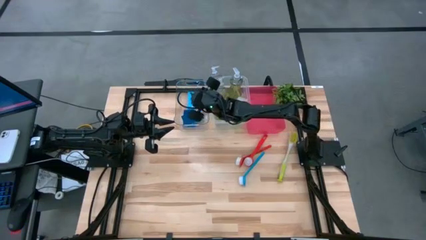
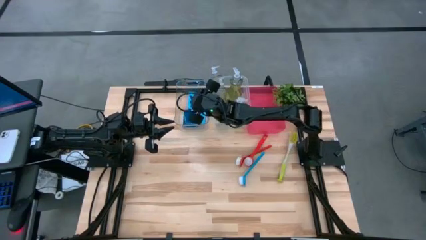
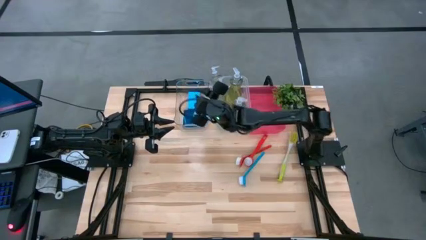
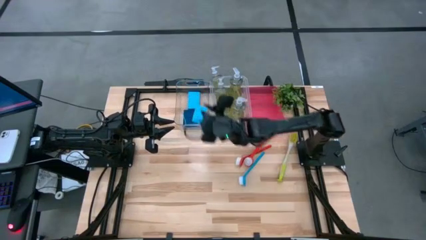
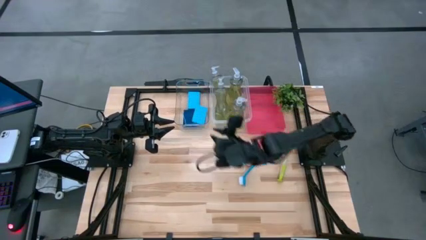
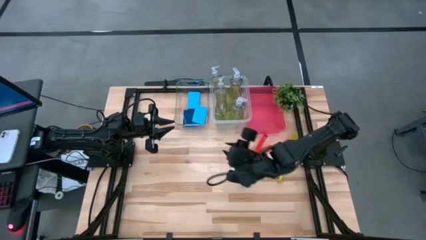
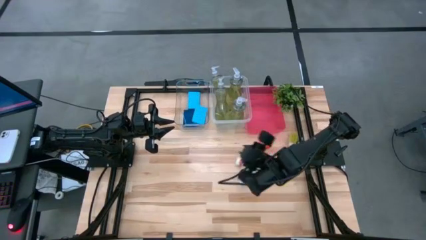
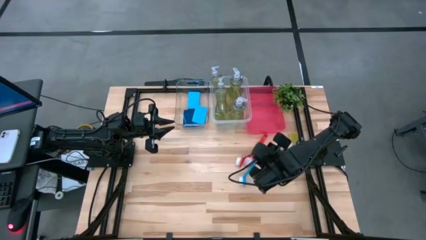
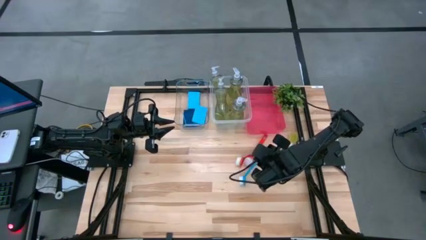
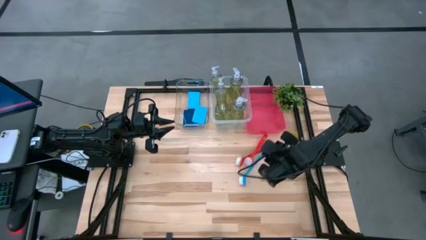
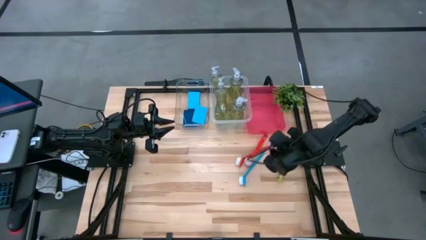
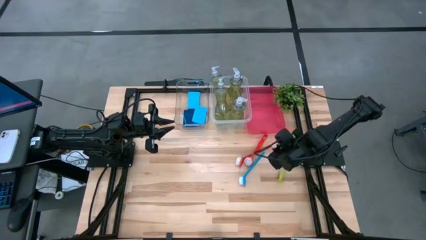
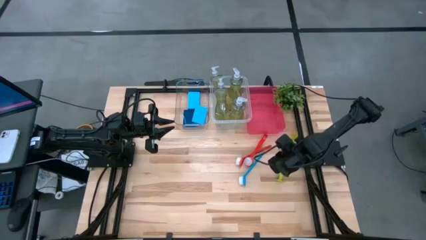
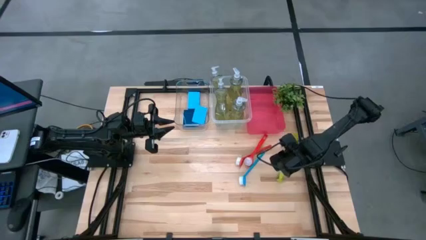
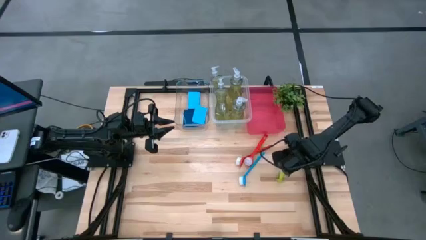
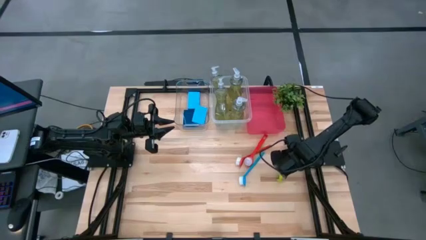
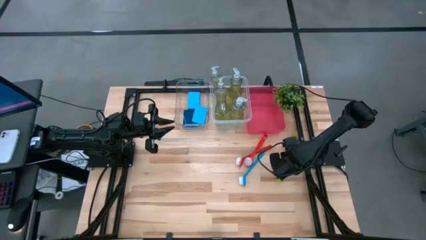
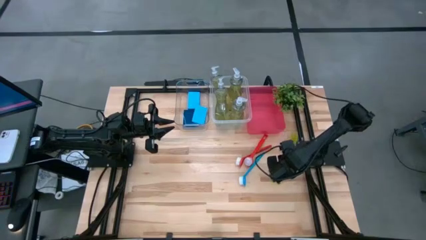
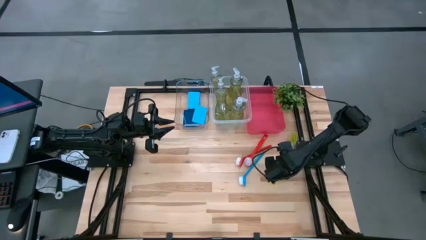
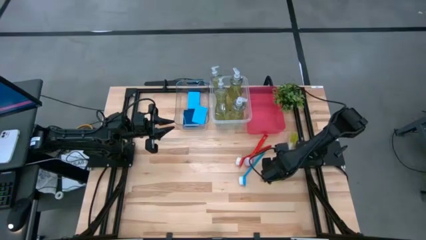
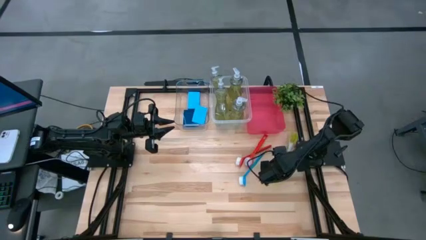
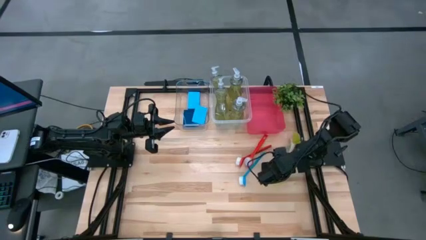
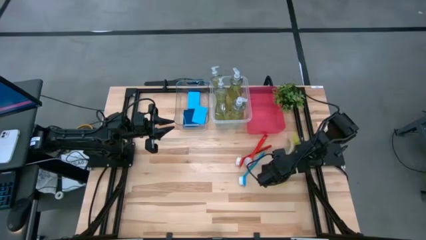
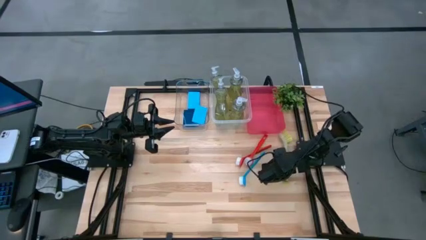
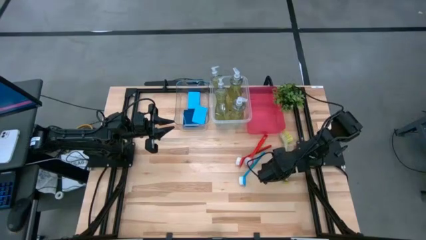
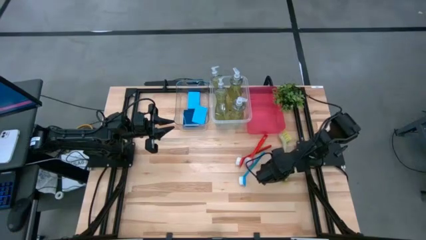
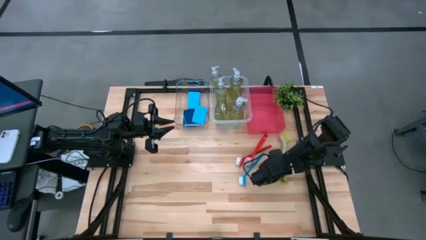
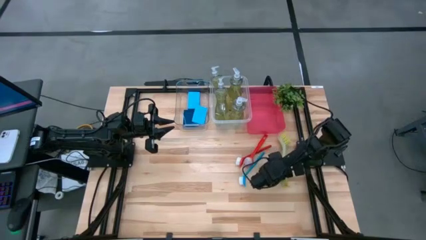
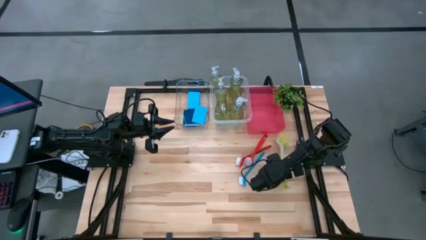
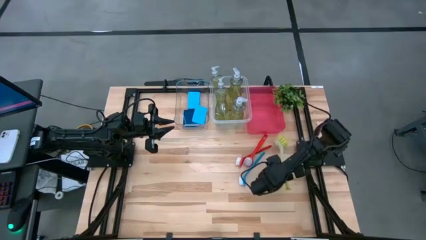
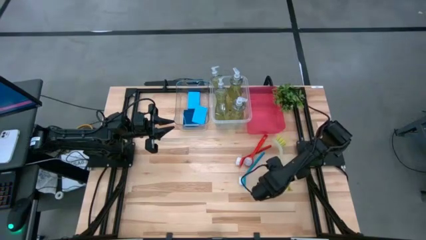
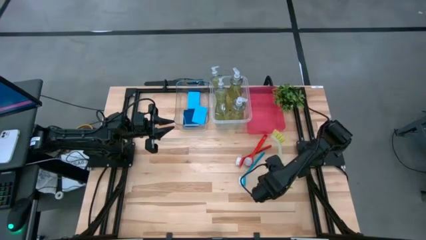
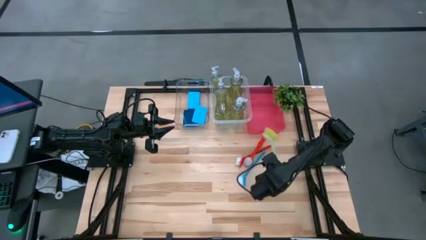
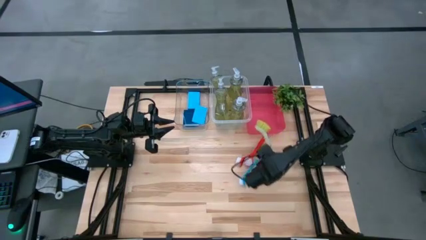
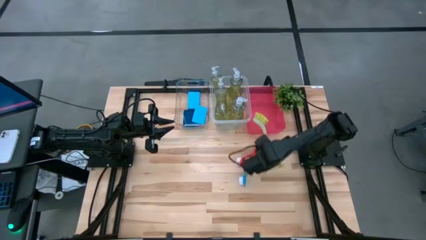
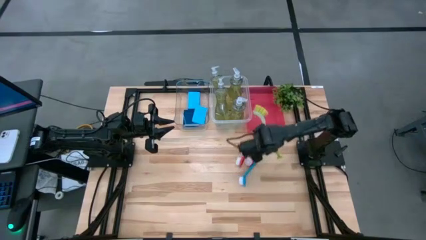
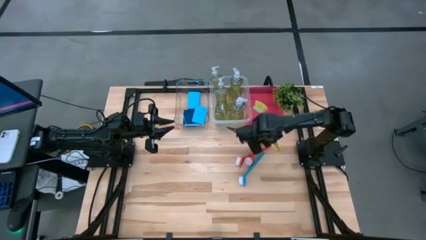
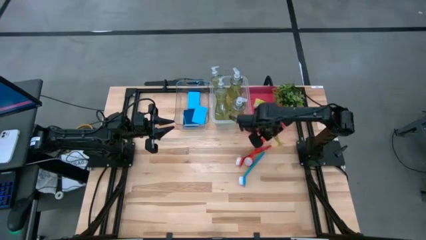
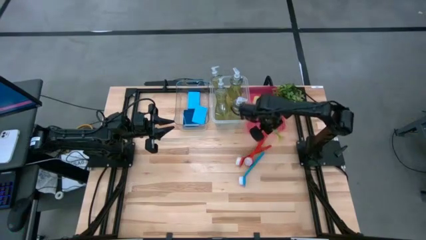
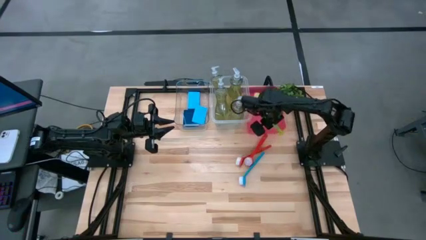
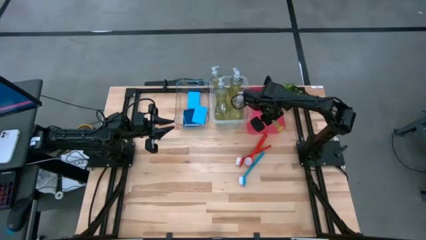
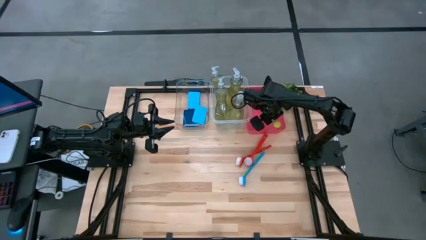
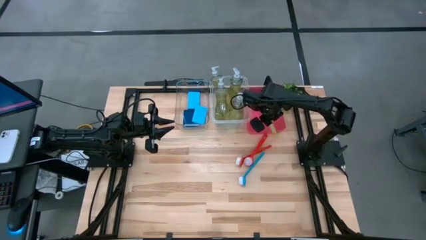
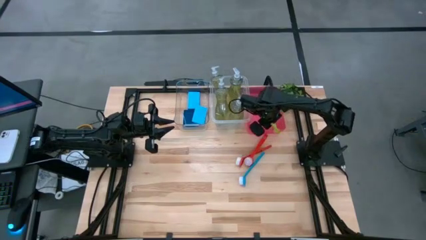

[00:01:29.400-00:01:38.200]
Task: Pick & Place Kitchen Sink Supplies
Put the yellow dish brush into the red bin

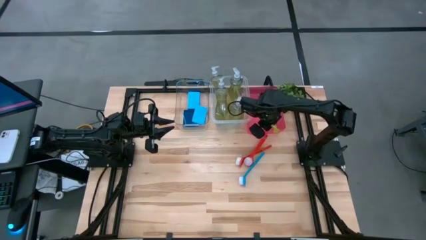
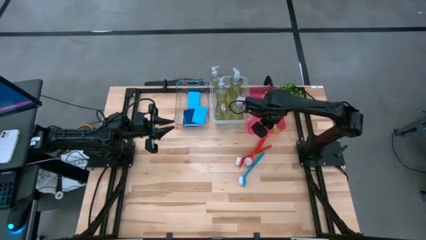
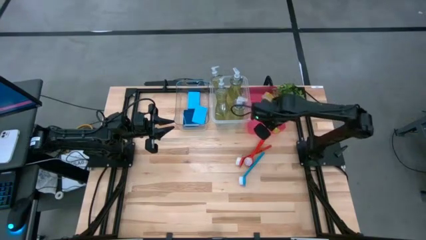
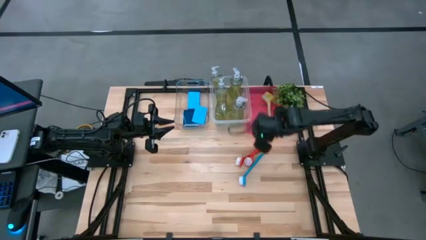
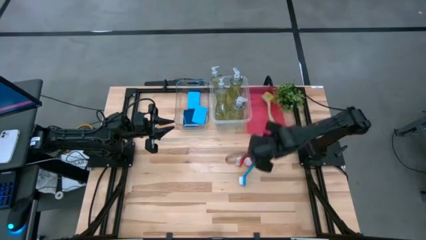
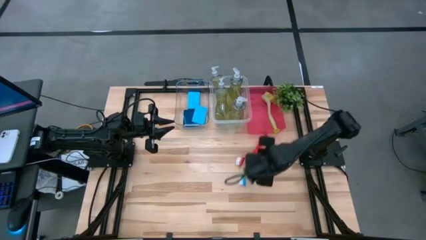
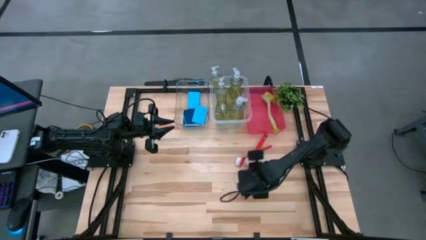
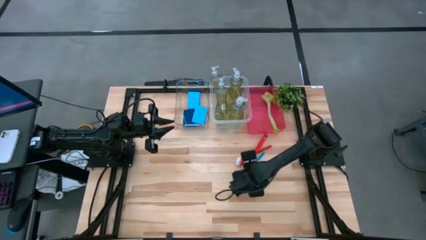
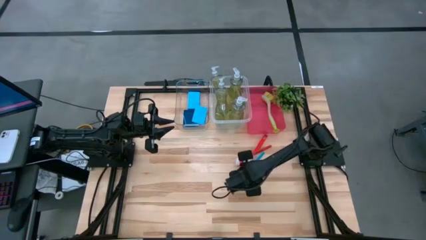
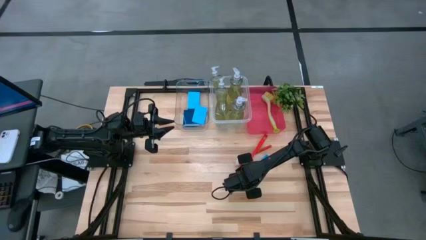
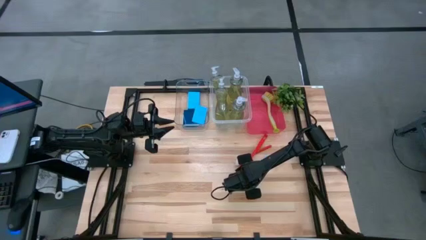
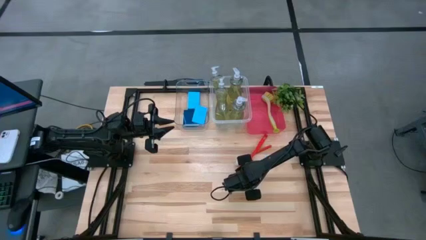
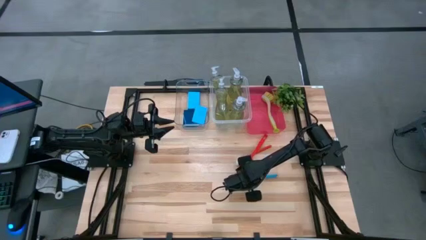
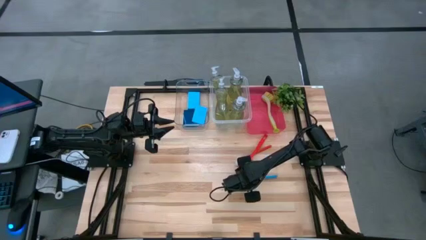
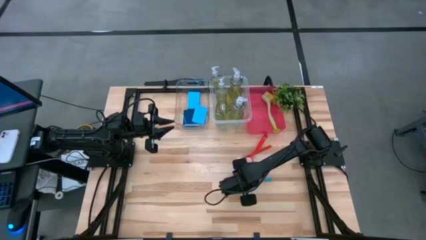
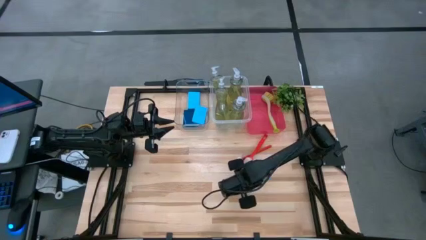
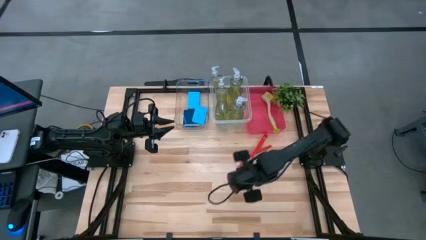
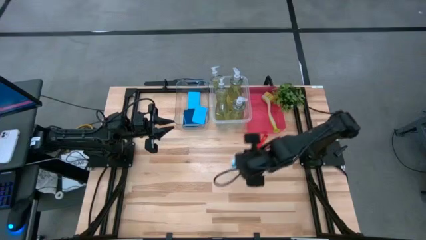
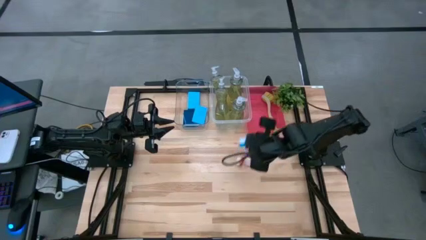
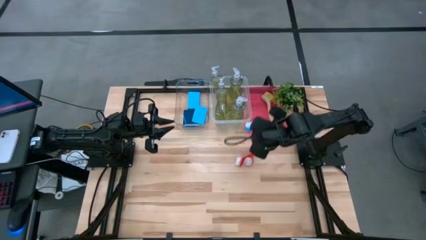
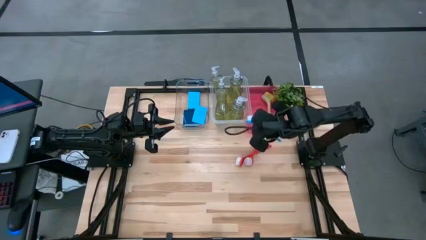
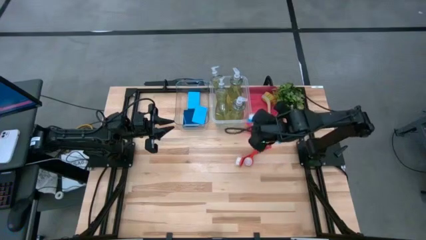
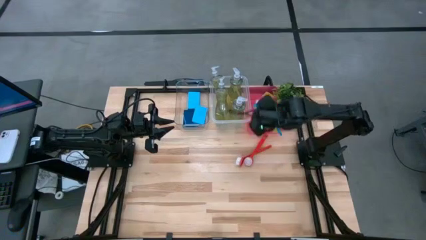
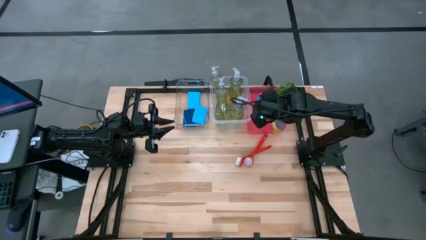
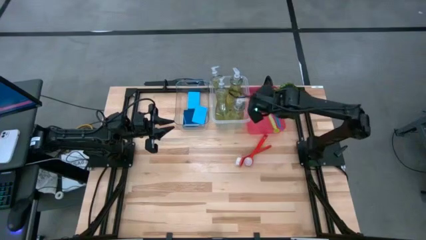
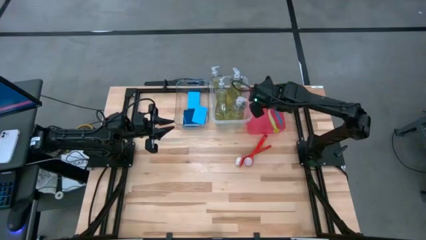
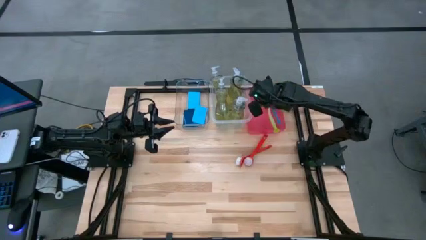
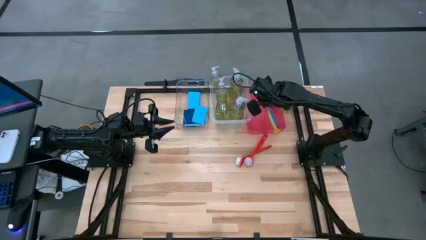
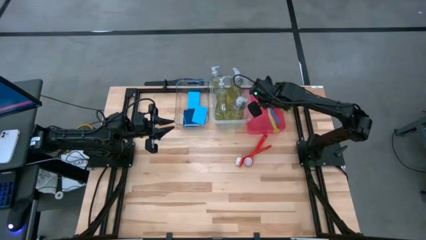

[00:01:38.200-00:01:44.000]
Put the blue dish brush into the red bin
